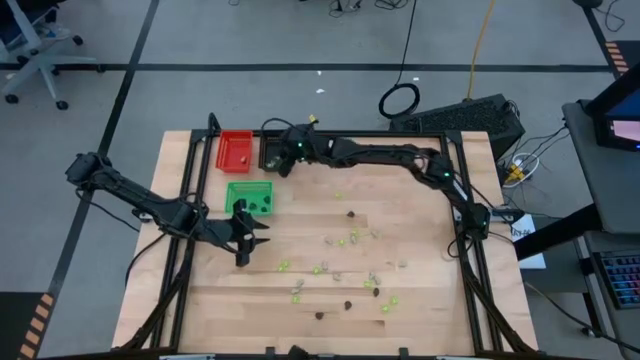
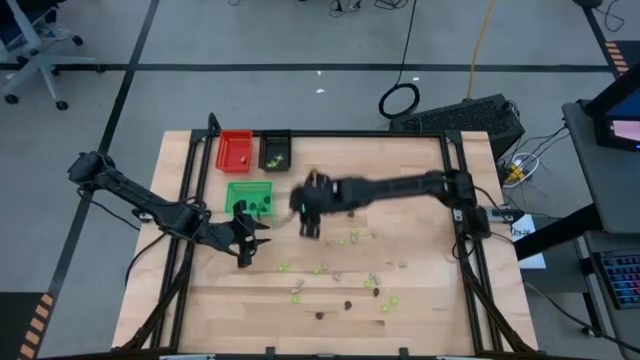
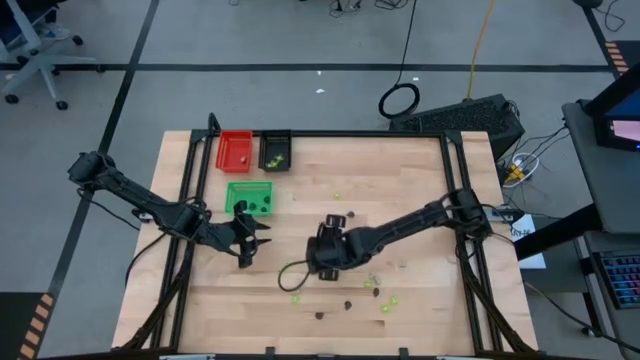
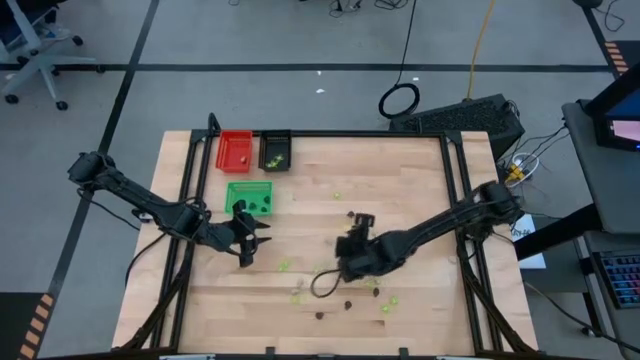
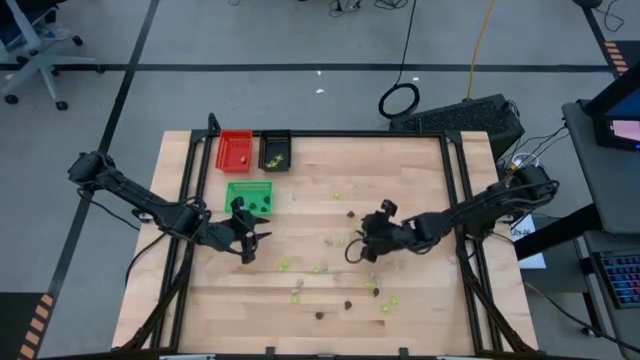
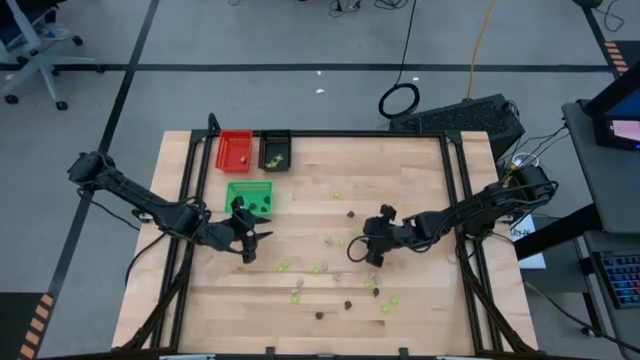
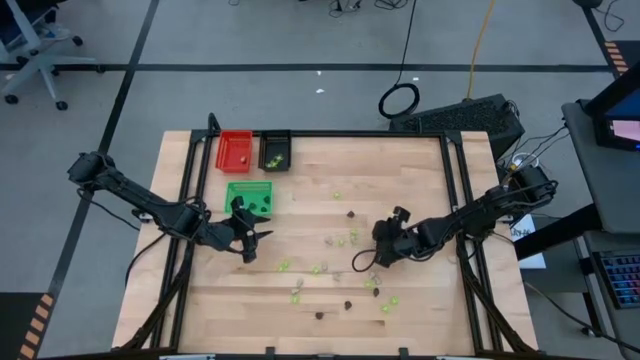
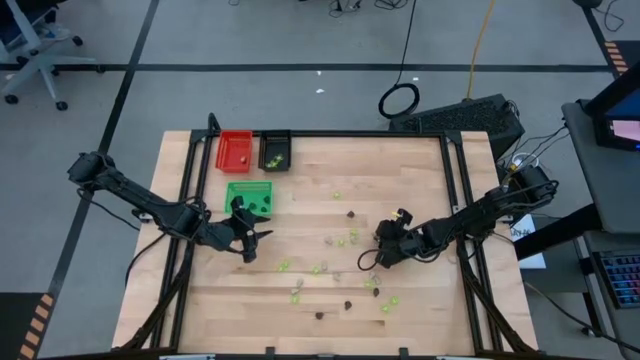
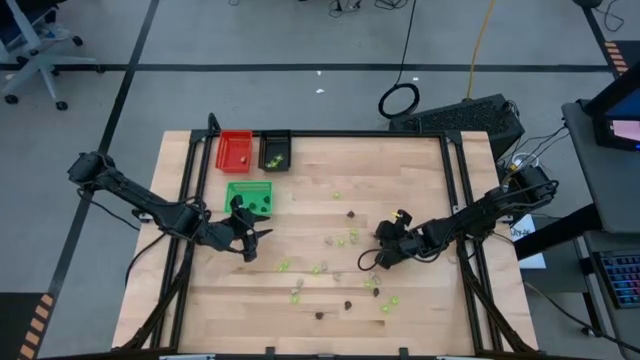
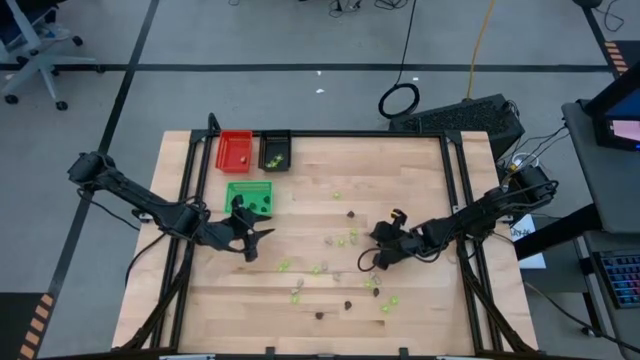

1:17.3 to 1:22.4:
Task: Sort Halloween decoration
Put the white skull toy into the red bin

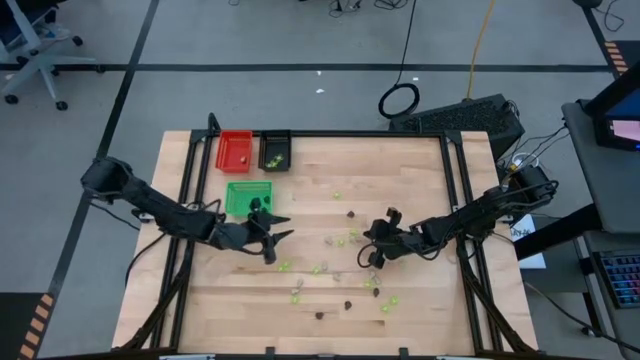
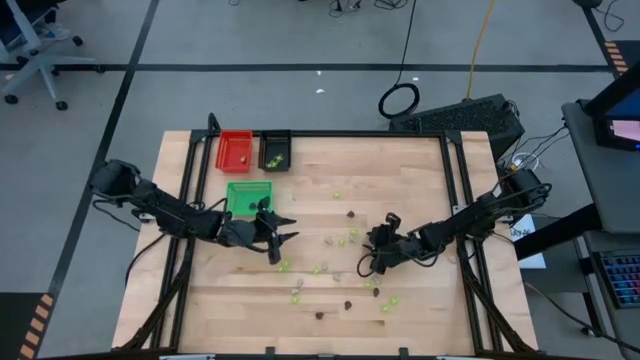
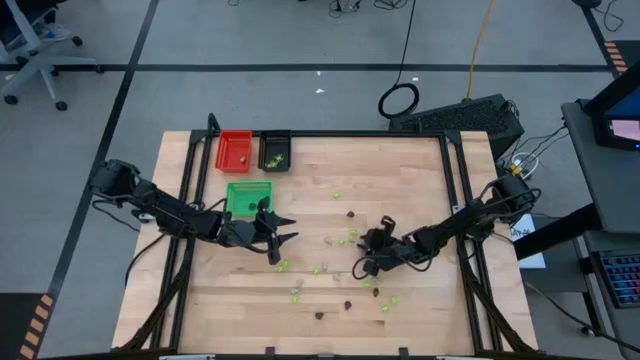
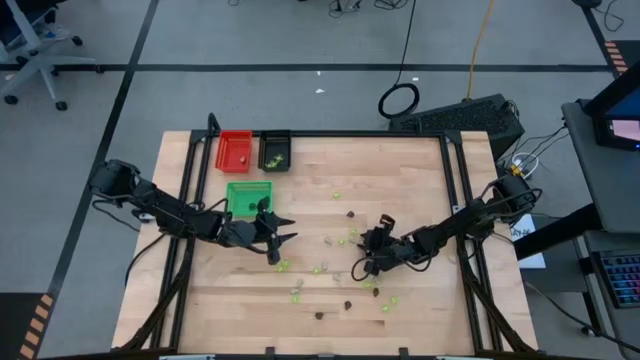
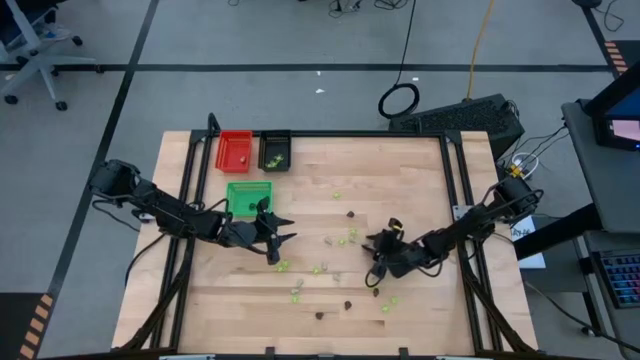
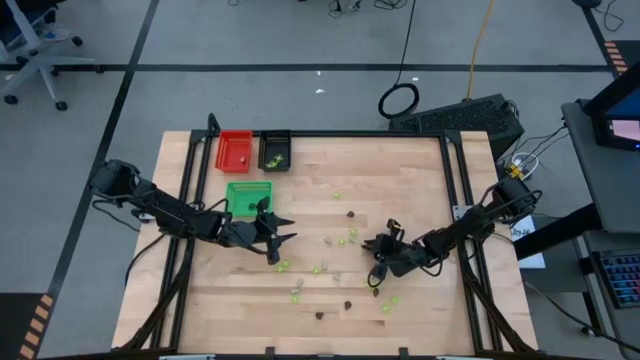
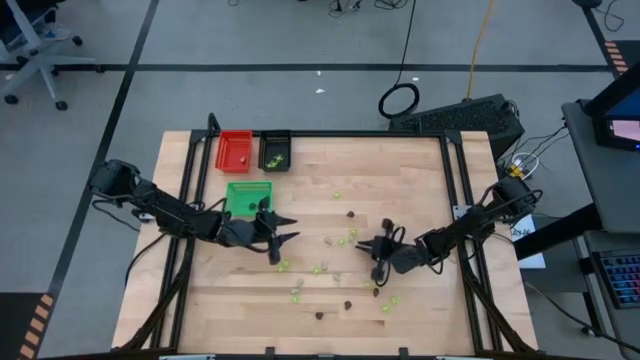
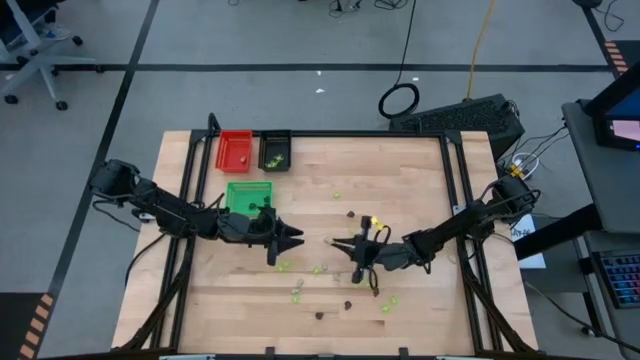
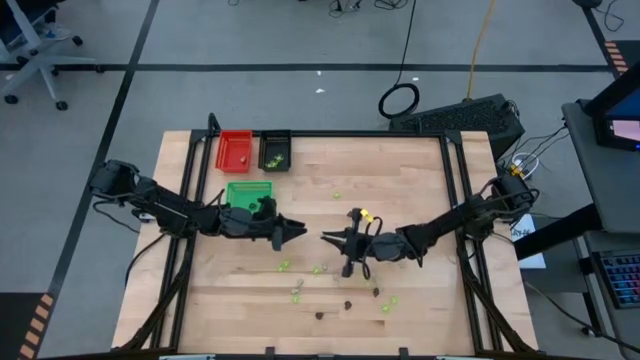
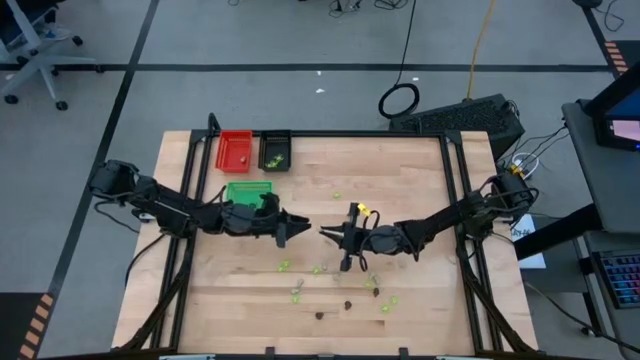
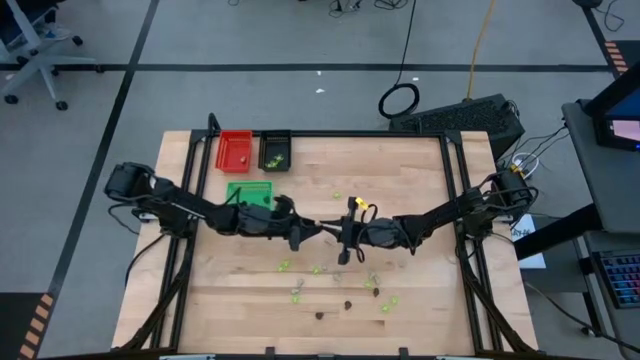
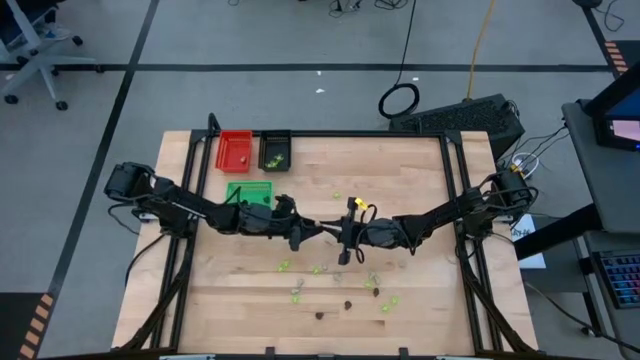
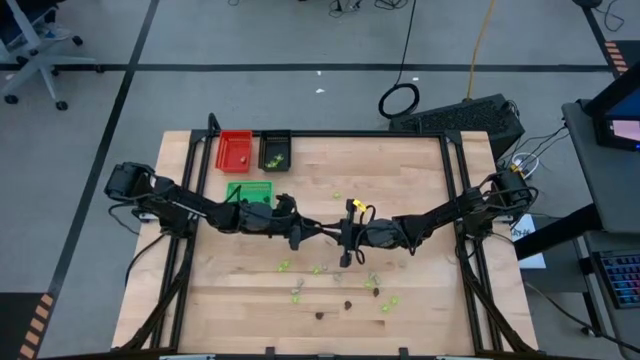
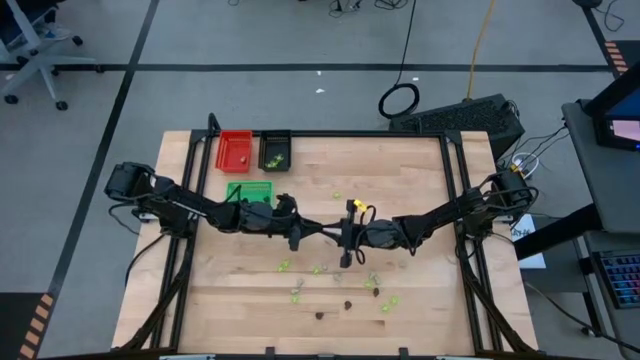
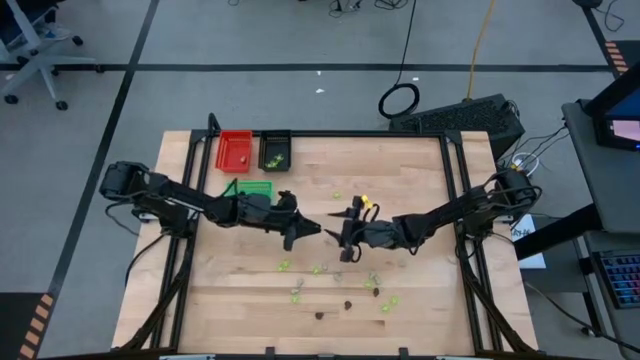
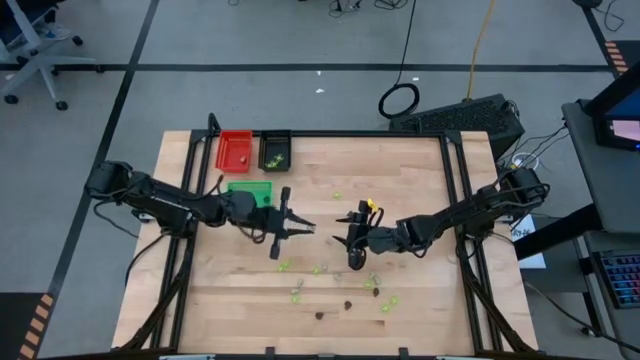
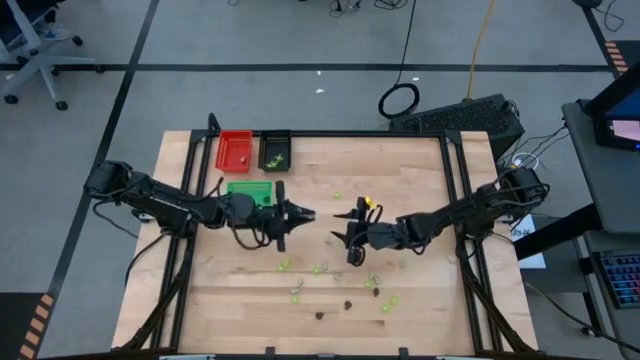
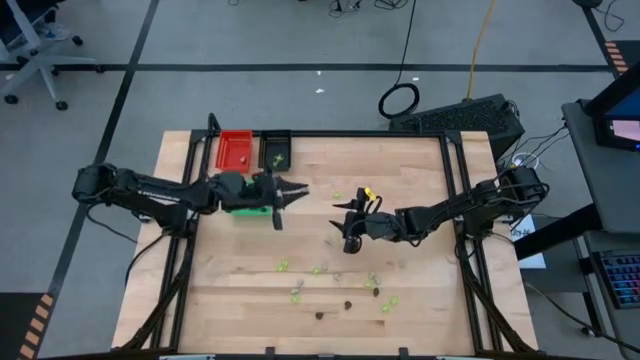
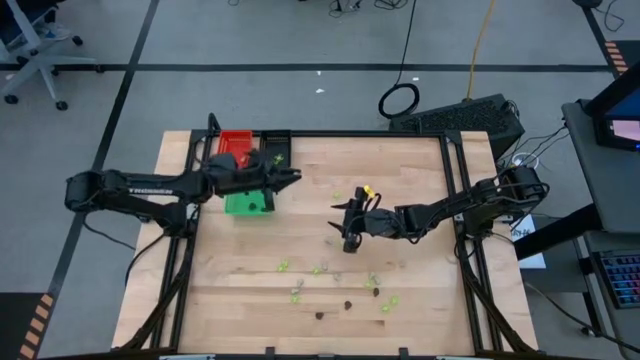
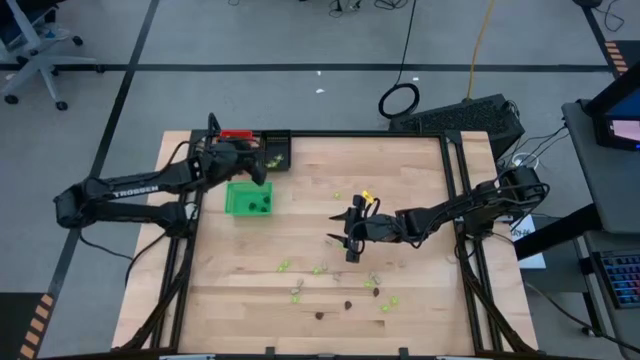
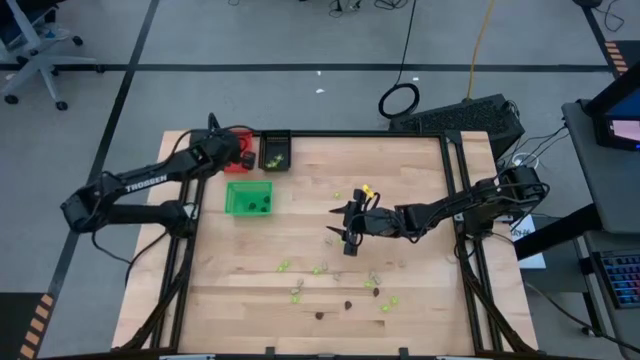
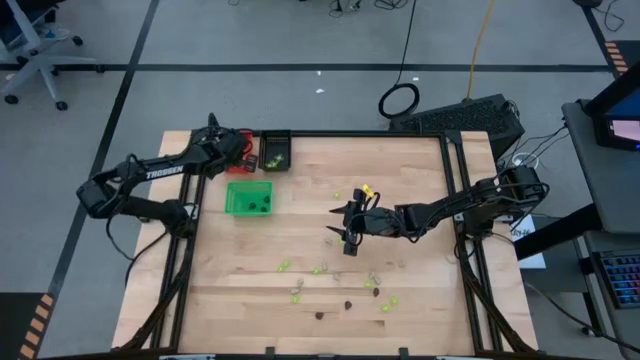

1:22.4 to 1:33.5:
Put the white skull toy into the red bin

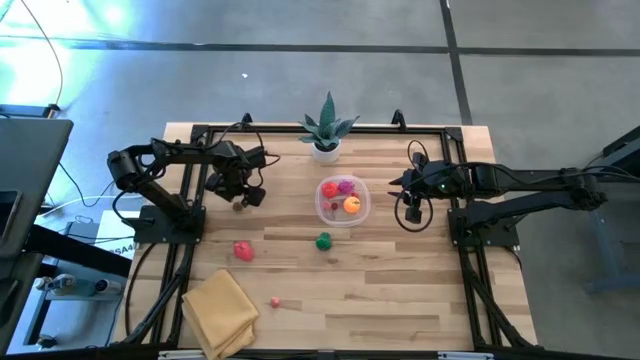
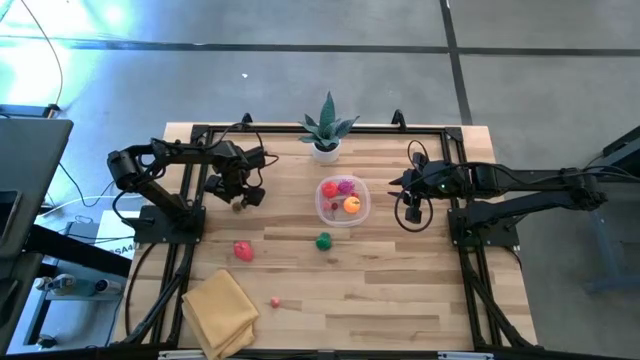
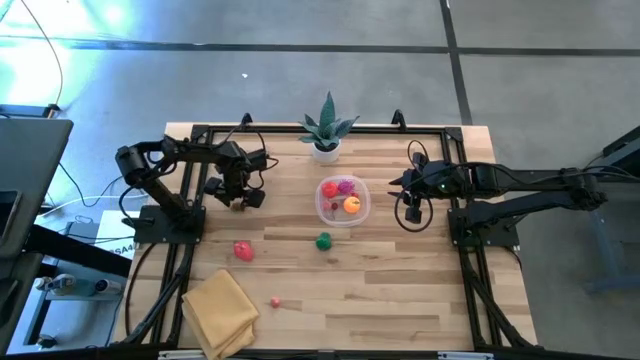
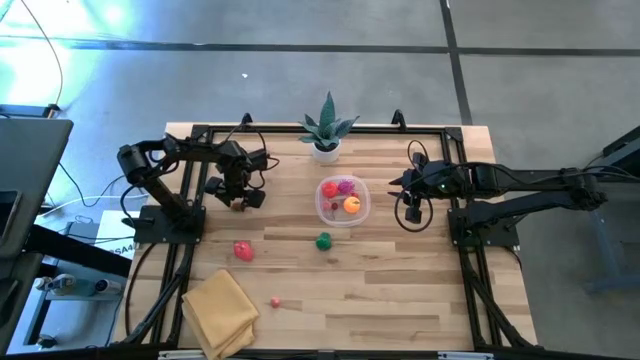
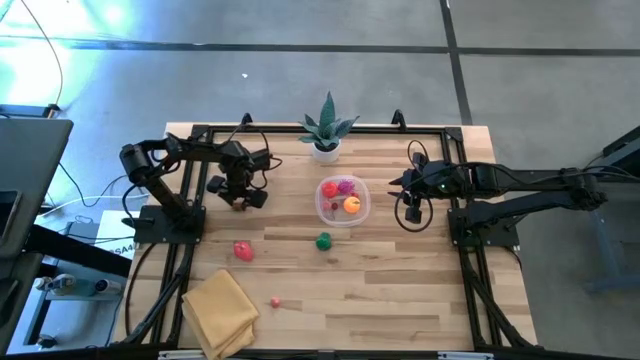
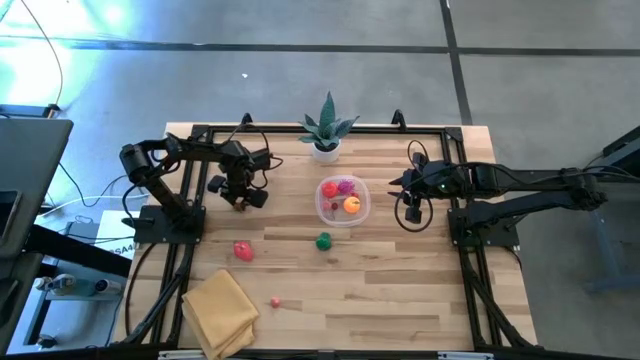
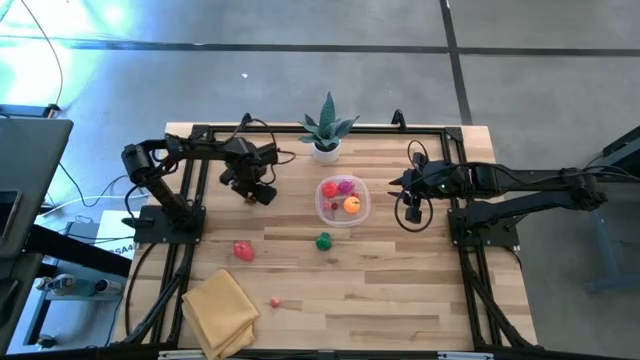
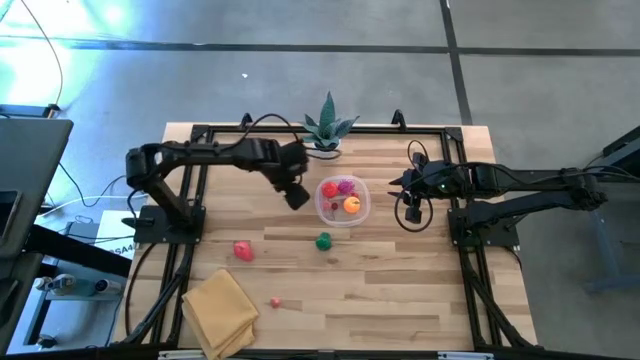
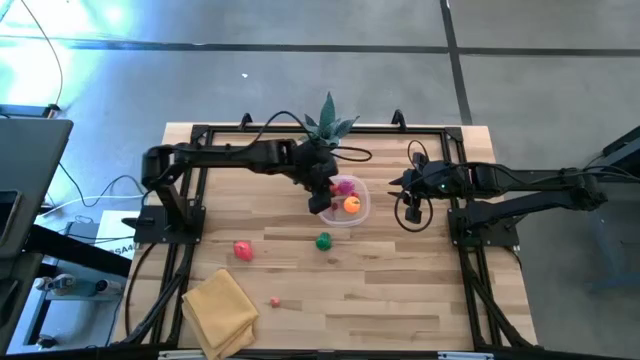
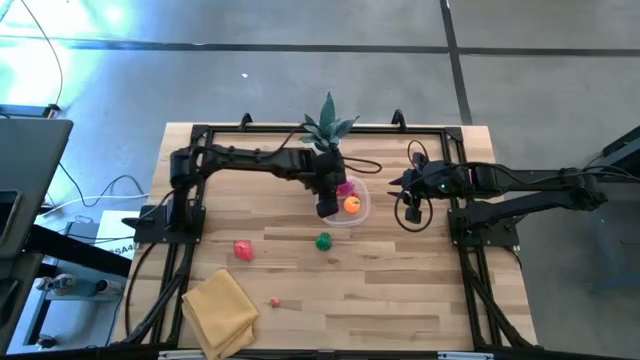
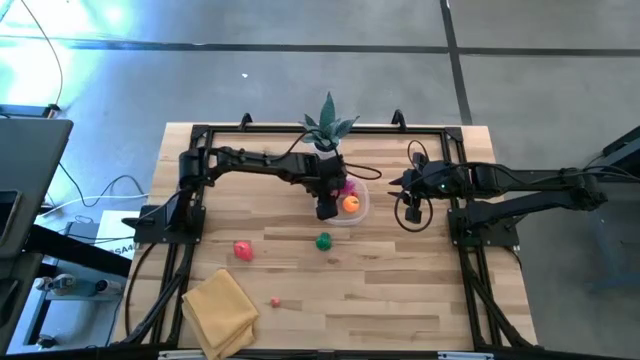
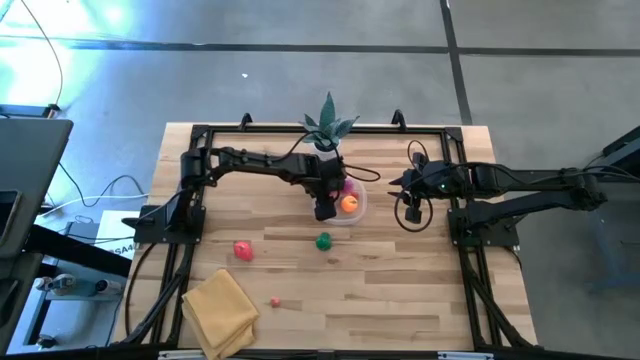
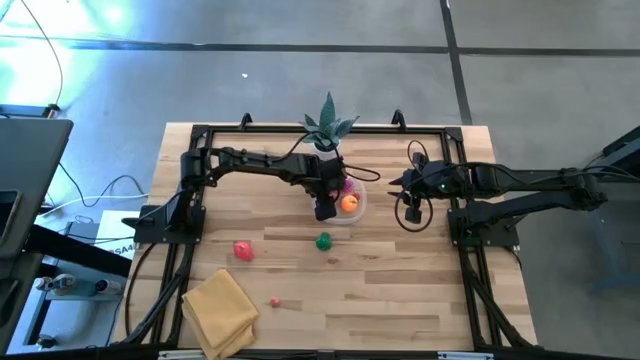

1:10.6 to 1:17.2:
Task: Pick and placing Produce into tupperware
Put the red strawberry into the transparent container
